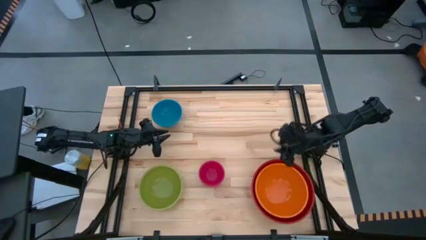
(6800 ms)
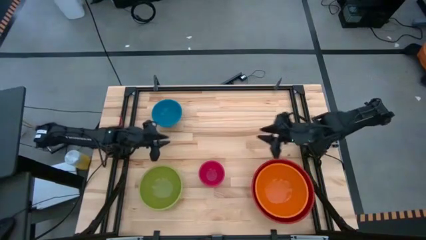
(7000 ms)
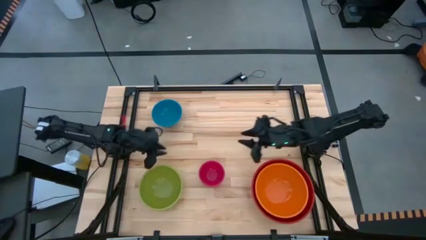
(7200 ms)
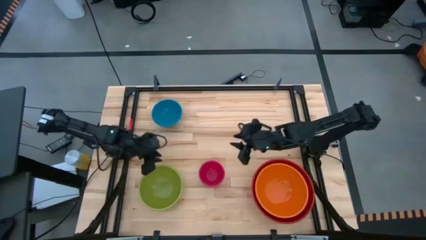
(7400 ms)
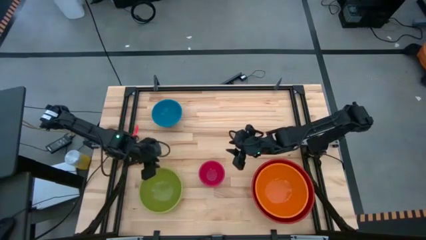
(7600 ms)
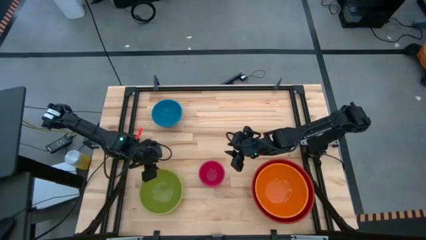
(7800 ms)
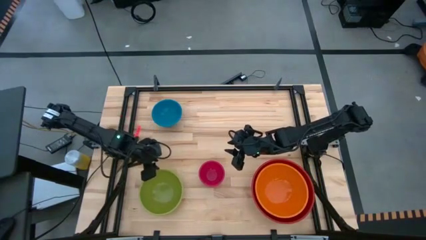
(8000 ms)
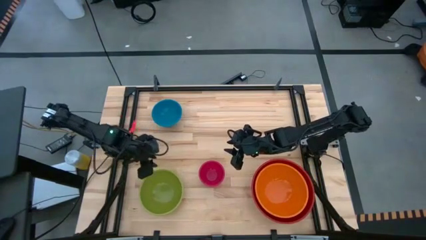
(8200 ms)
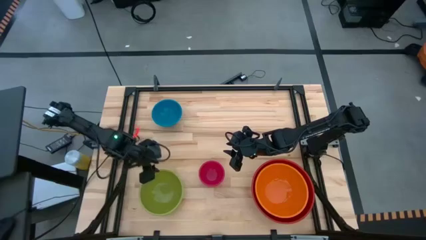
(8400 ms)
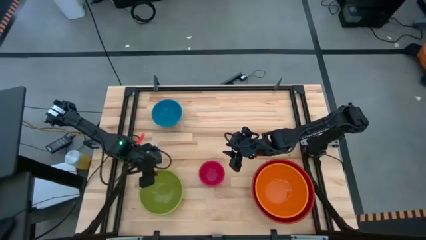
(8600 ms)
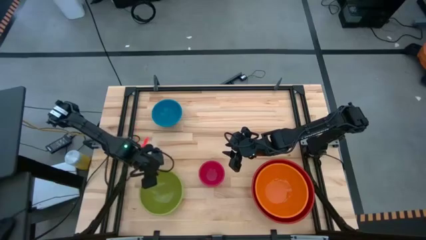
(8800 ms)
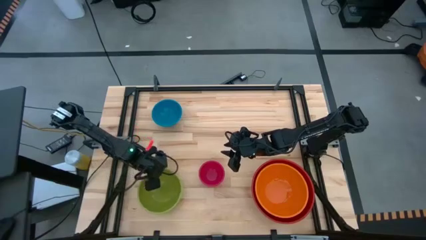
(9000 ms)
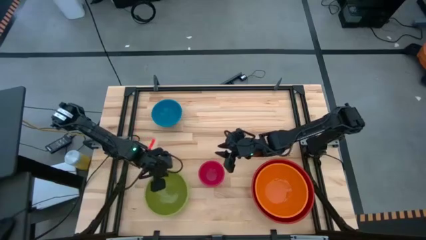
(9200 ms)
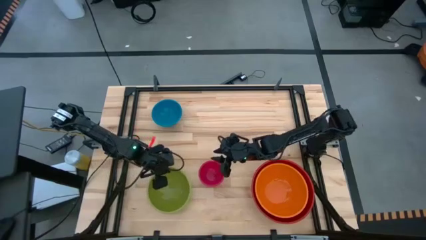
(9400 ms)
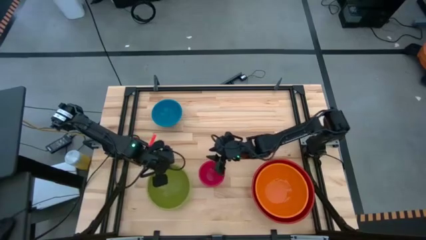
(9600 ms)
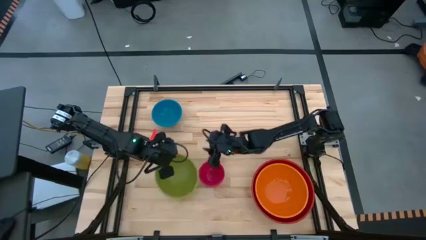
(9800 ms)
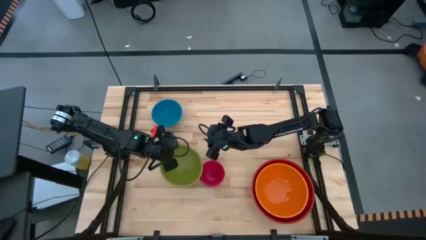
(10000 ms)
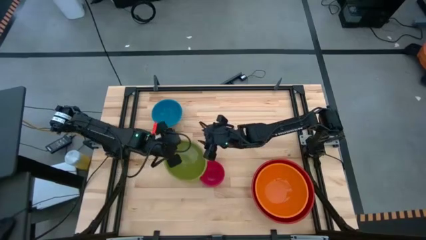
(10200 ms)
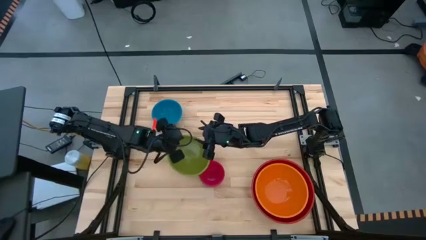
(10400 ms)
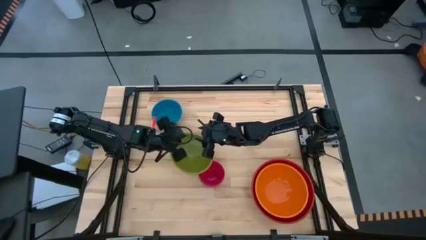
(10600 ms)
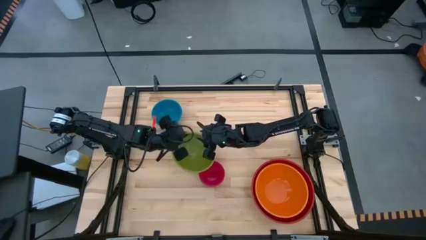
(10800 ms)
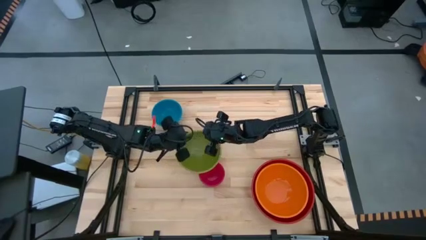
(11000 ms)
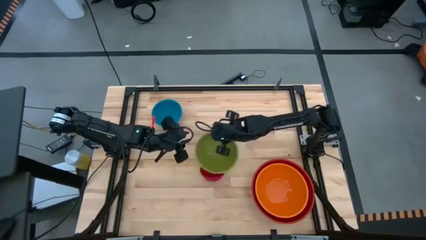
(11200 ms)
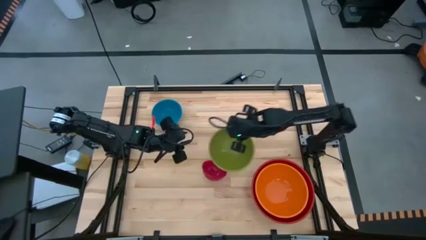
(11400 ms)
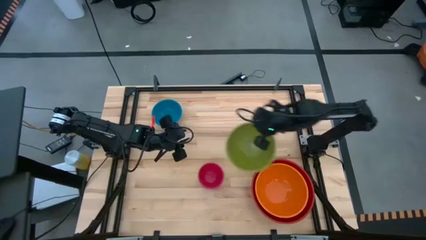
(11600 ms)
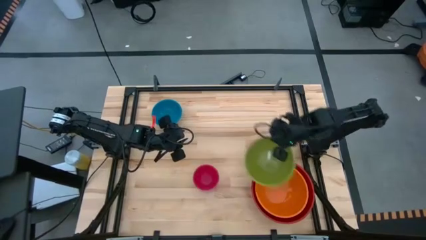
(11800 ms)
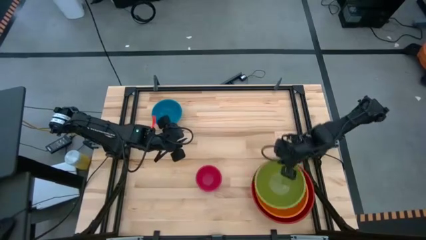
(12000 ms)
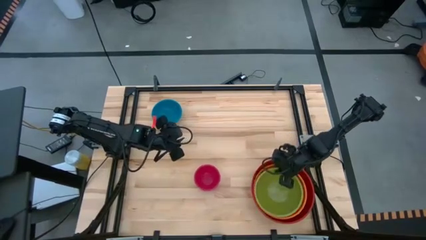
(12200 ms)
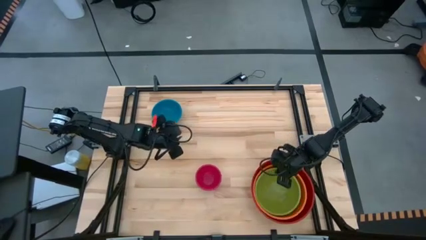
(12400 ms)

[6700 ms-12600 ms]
Stack the green bowl on top of the orange bowl

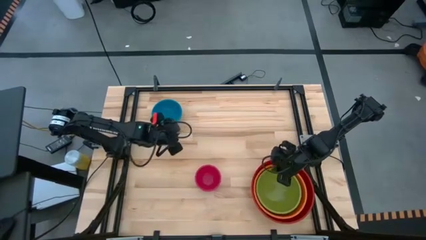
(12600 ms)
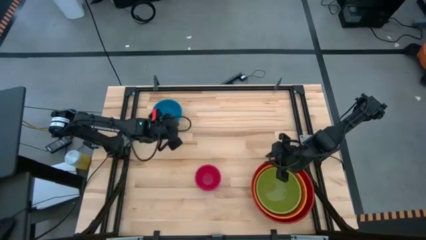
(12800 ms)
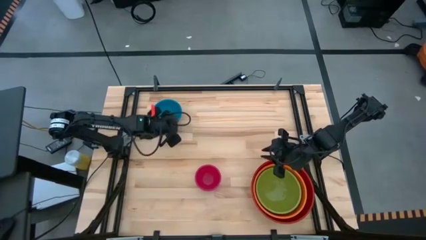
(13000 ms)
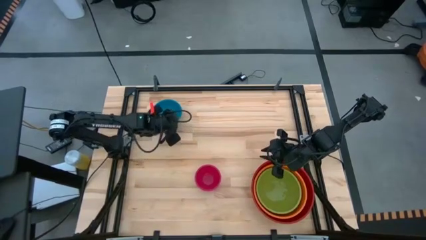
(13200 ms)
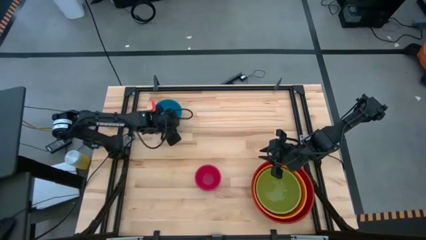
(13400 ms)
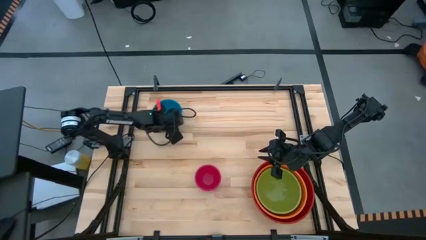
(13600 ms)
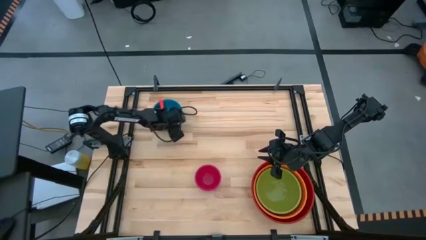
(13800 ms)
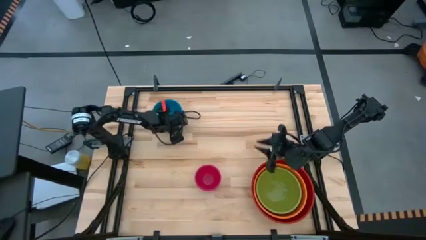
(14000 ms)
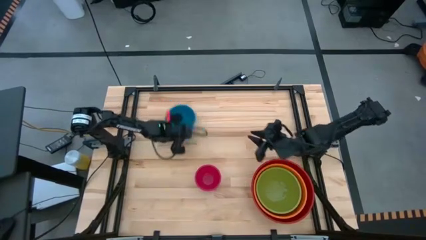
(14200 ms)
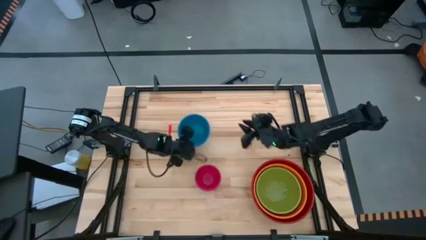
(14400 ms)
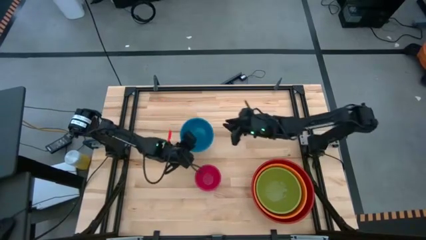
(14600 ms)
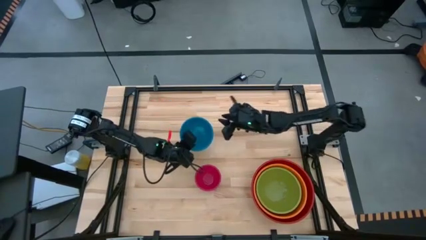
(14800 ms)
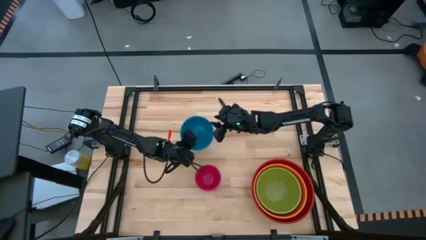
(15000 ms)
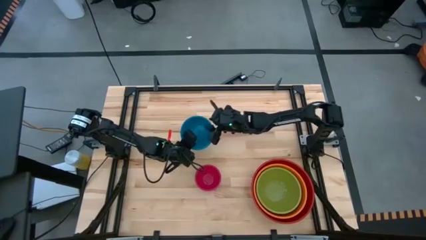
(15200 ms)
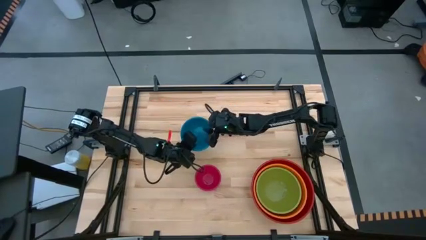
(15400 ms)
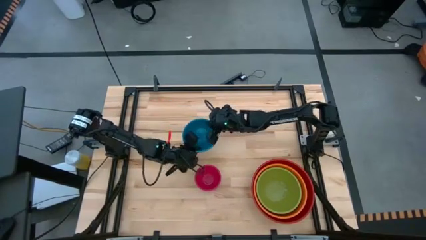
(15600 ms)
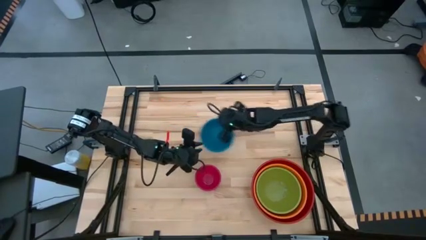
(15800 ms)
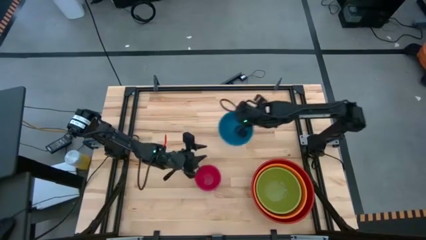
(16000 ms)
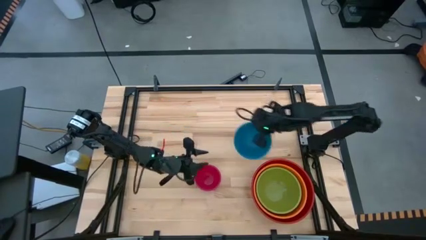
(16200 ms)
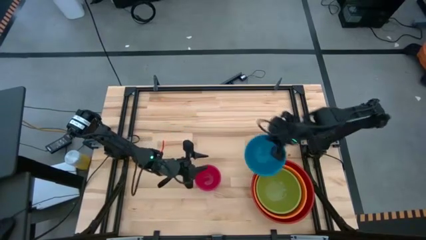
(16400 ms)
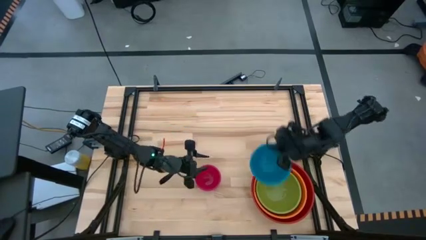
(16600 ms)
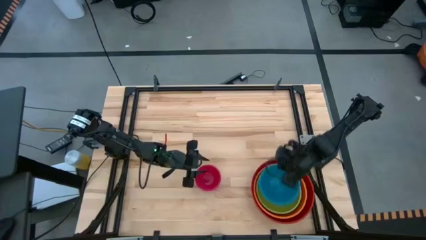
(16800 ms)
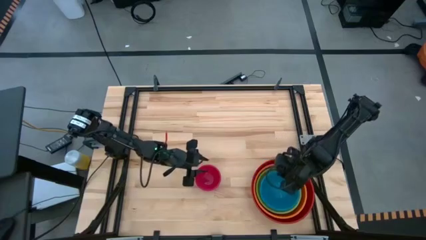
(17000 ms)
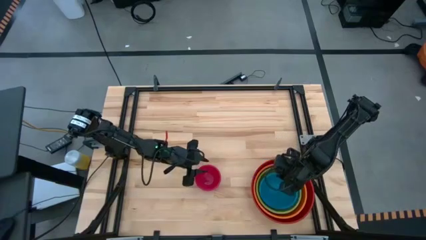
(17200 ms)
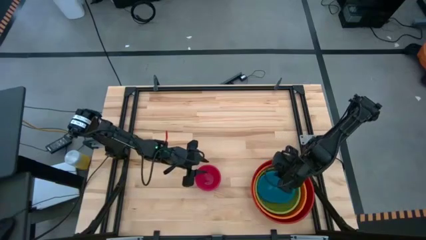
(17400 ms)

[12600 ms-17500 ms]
Stack the blue bowl on top of the green bowl

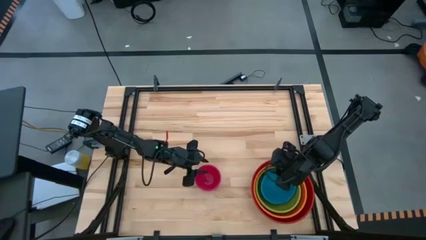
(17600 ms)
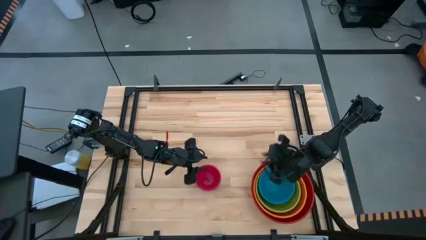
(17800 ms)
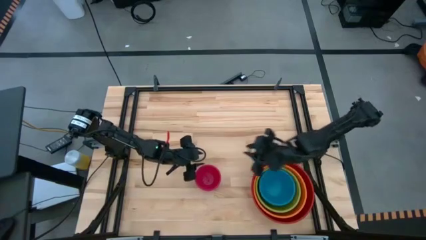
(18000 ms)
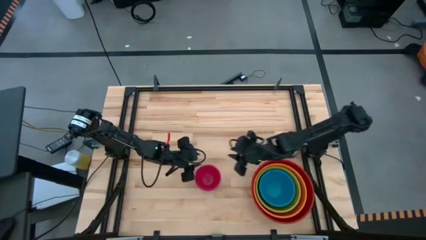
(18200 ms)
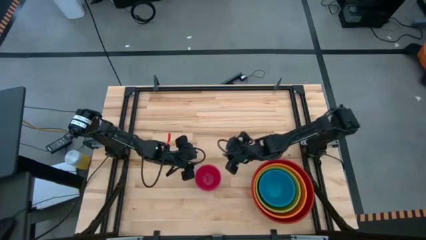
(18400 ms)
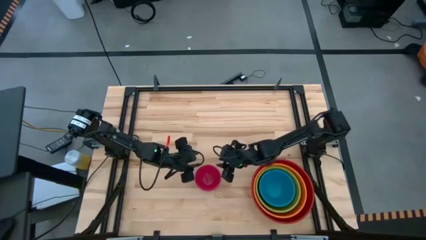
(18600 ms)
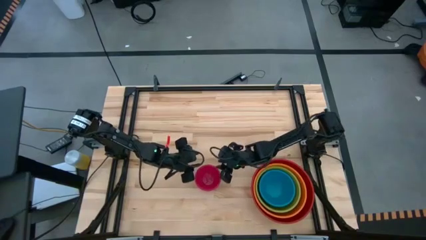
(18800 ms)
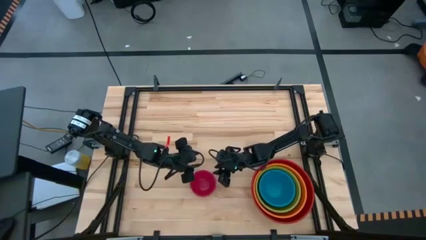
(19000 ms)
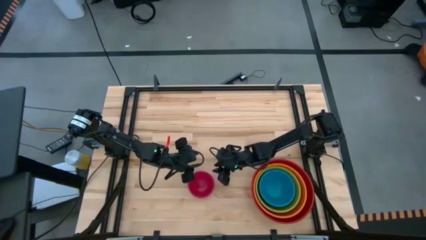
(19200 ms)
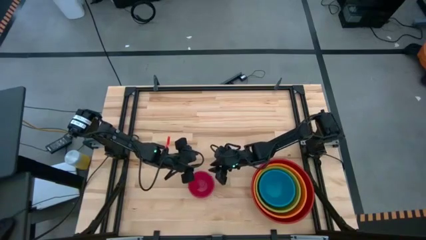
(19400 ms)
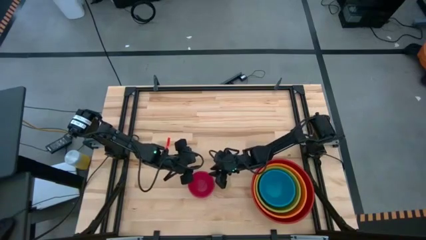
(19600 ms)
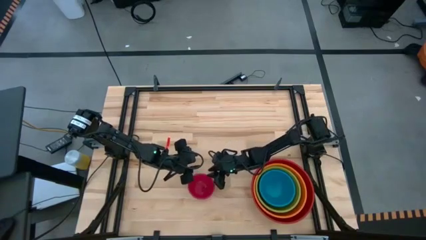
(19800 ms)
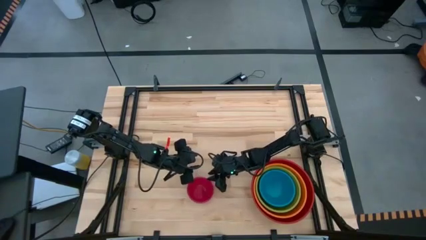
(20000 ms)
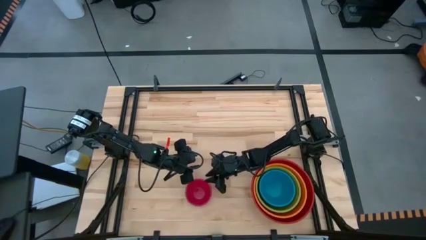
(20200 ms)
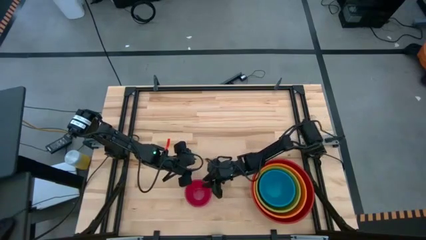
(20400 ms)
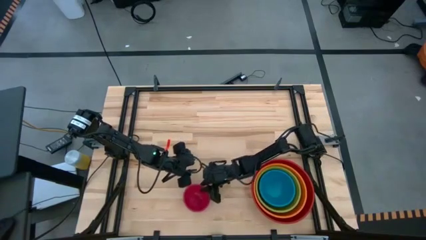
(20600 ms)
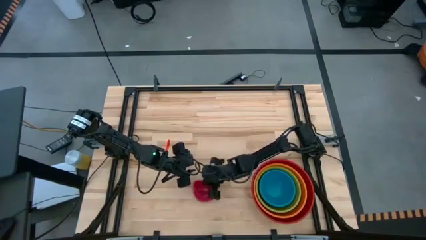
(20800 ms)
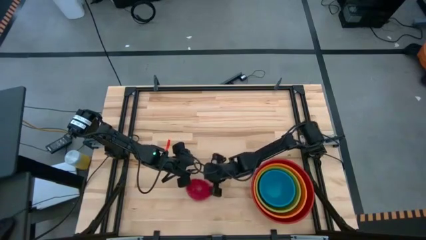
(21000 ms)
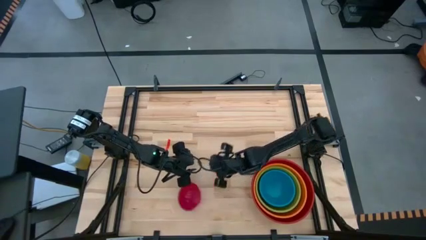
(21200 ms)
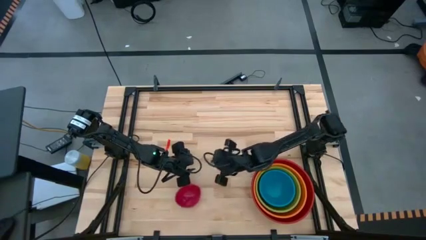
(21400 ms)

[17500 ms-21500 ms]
Stack the pink bowl on top of the blue bowl
